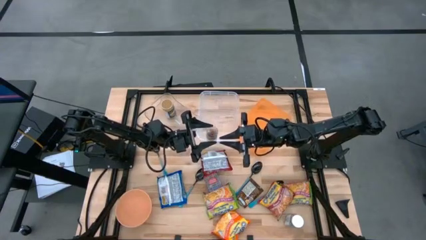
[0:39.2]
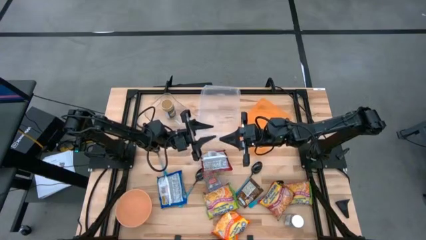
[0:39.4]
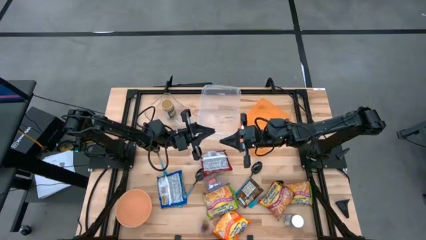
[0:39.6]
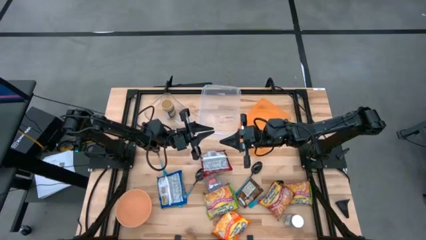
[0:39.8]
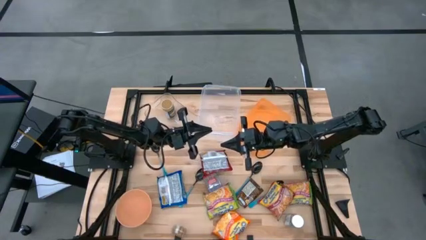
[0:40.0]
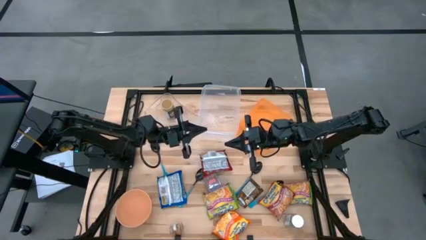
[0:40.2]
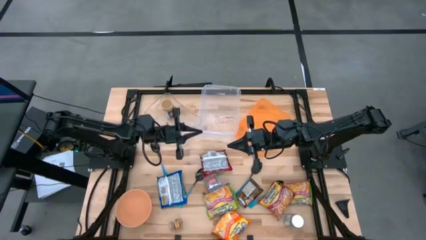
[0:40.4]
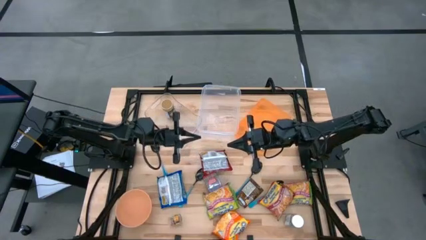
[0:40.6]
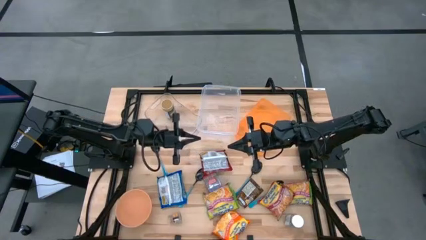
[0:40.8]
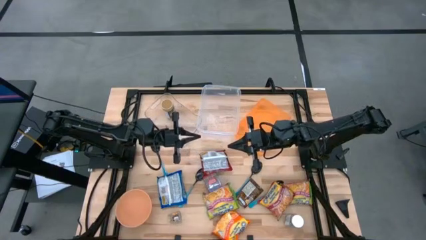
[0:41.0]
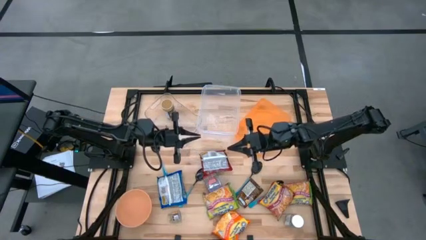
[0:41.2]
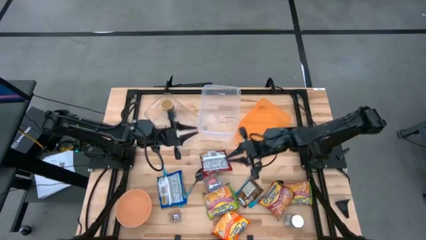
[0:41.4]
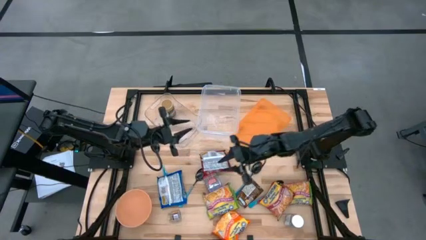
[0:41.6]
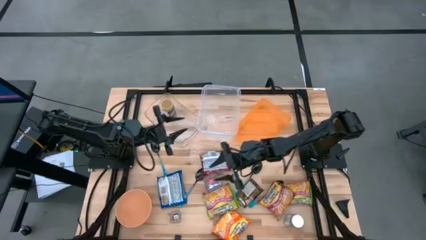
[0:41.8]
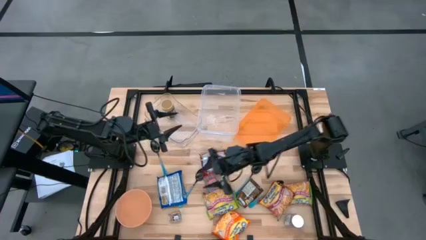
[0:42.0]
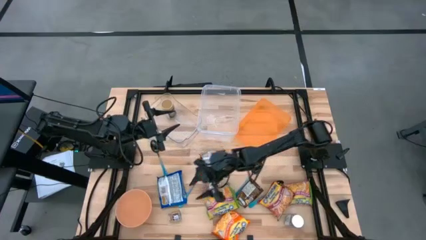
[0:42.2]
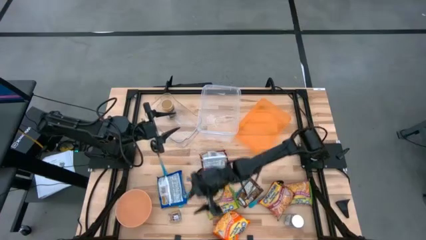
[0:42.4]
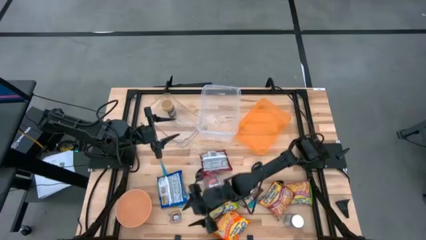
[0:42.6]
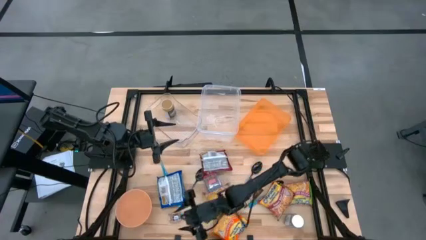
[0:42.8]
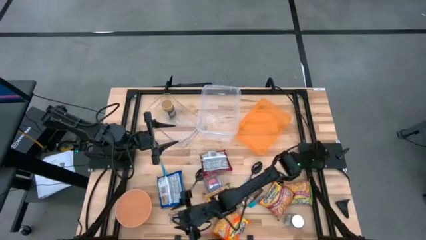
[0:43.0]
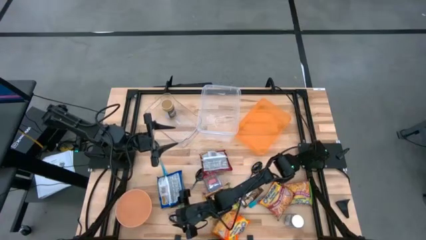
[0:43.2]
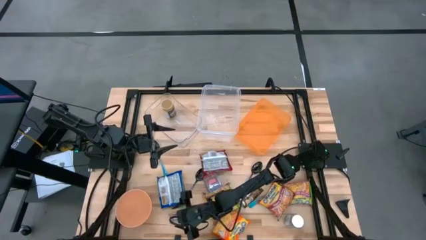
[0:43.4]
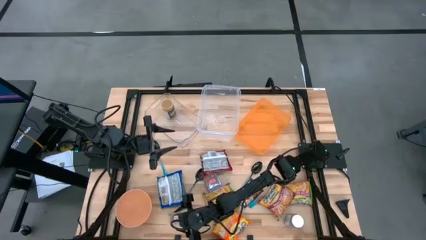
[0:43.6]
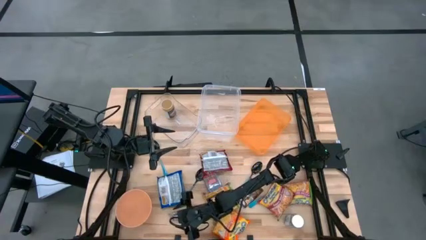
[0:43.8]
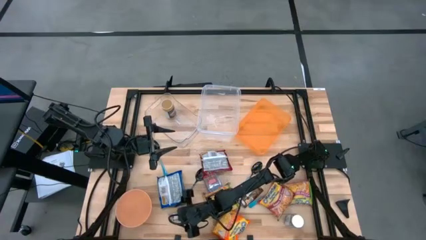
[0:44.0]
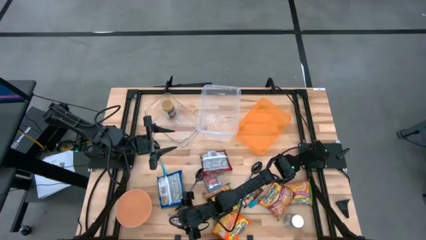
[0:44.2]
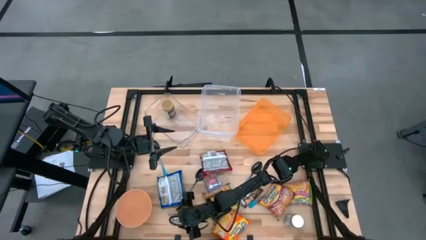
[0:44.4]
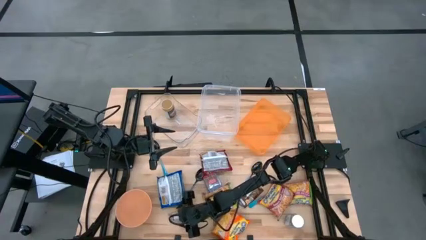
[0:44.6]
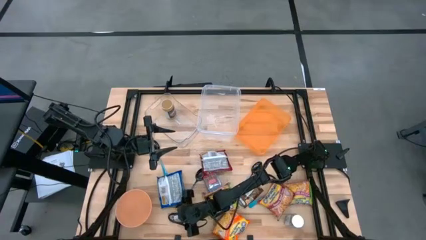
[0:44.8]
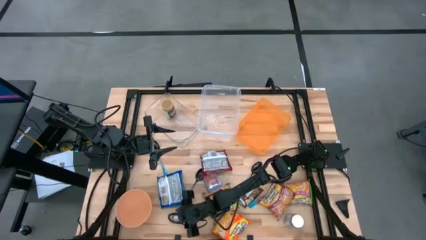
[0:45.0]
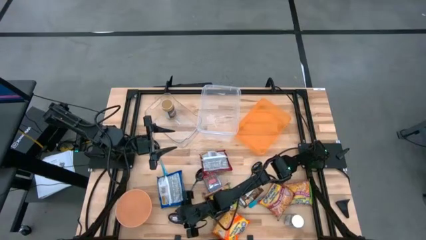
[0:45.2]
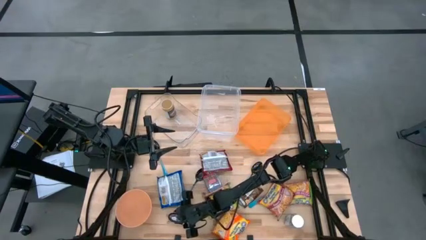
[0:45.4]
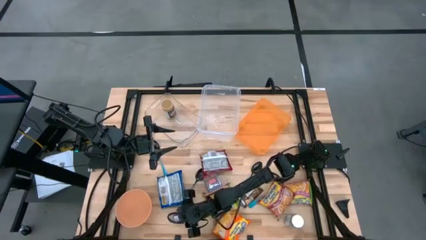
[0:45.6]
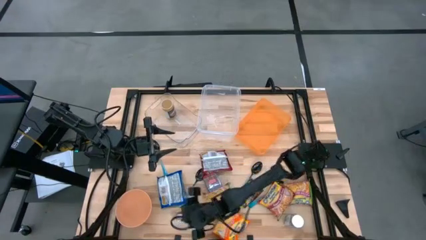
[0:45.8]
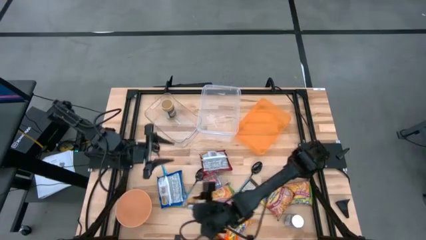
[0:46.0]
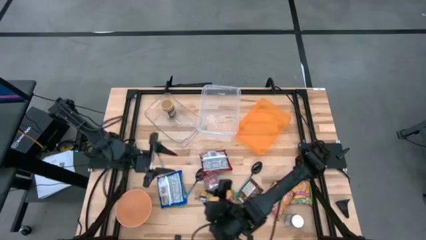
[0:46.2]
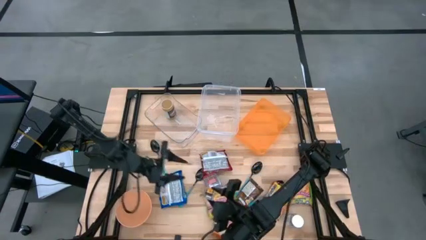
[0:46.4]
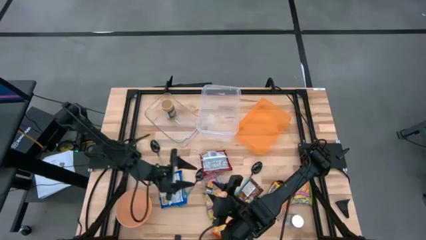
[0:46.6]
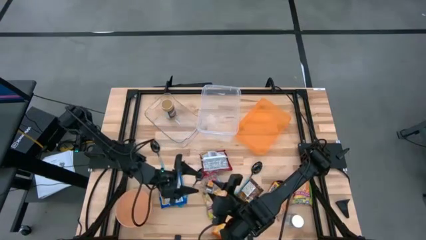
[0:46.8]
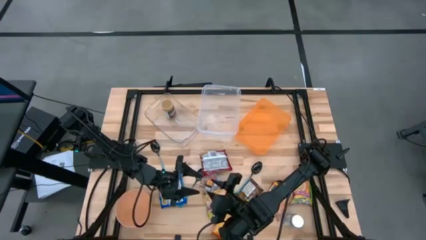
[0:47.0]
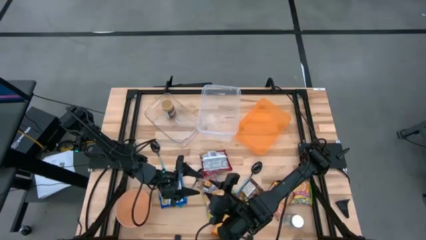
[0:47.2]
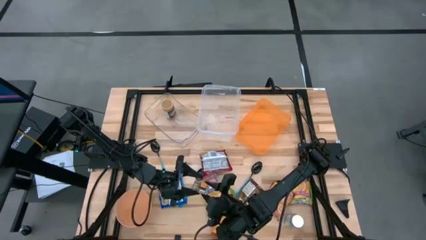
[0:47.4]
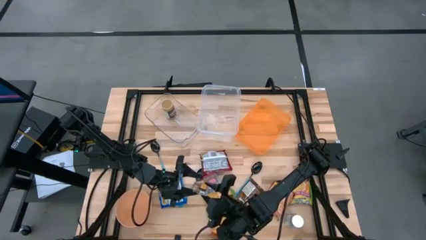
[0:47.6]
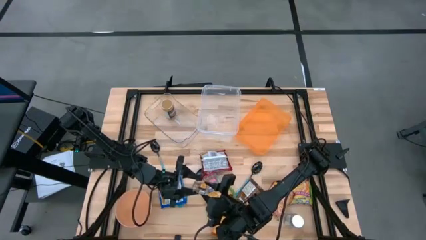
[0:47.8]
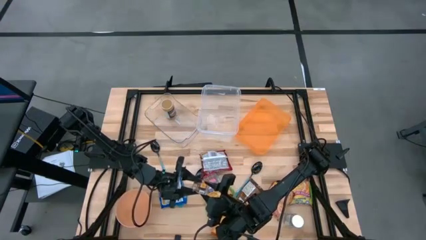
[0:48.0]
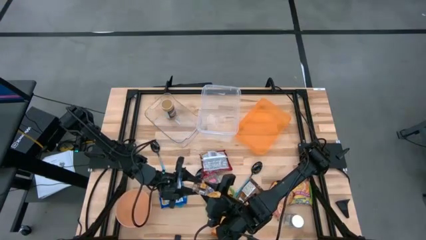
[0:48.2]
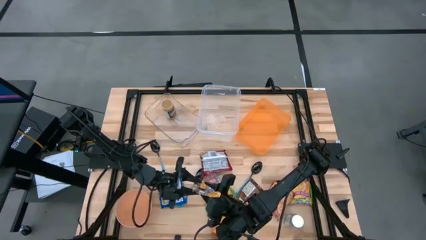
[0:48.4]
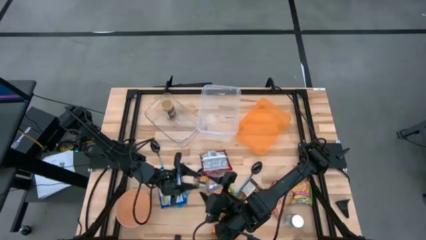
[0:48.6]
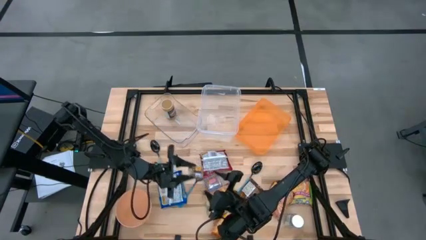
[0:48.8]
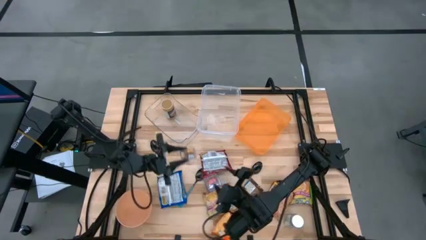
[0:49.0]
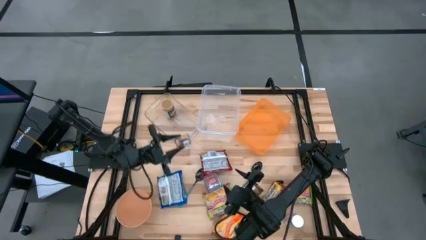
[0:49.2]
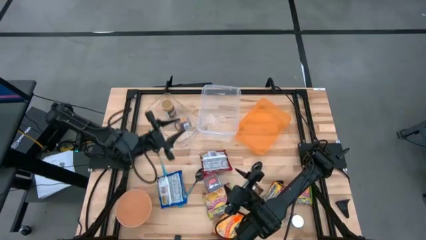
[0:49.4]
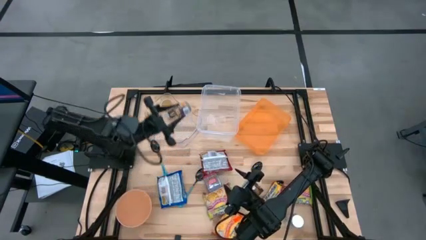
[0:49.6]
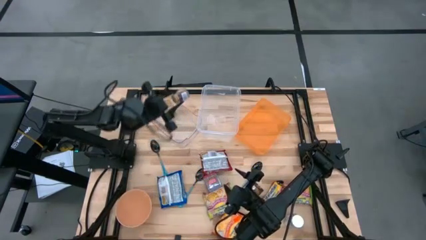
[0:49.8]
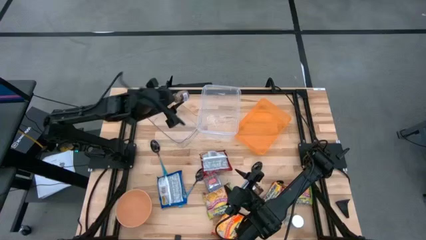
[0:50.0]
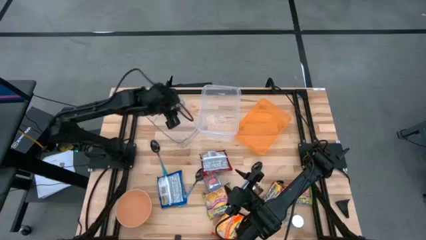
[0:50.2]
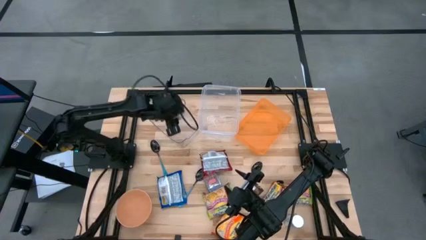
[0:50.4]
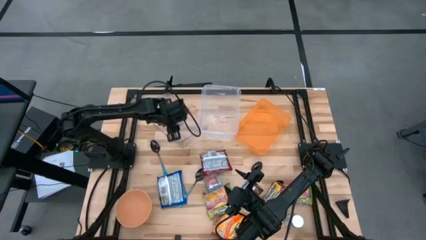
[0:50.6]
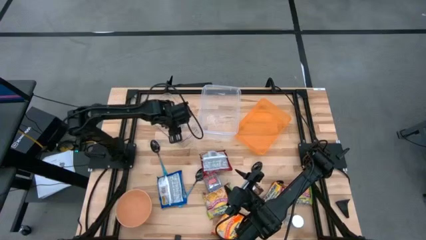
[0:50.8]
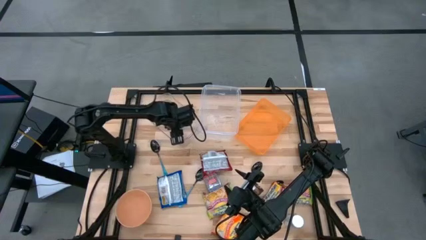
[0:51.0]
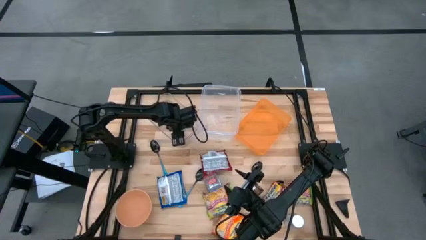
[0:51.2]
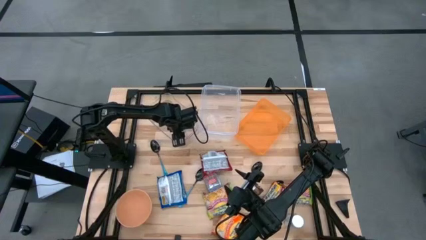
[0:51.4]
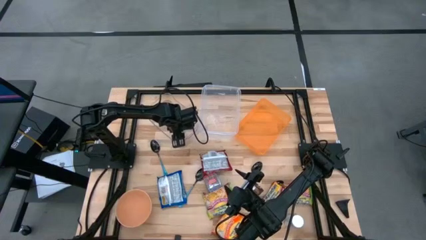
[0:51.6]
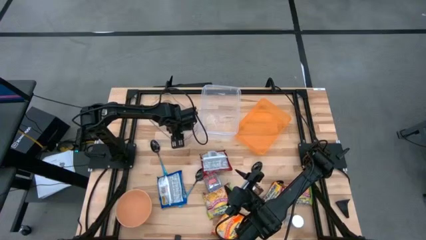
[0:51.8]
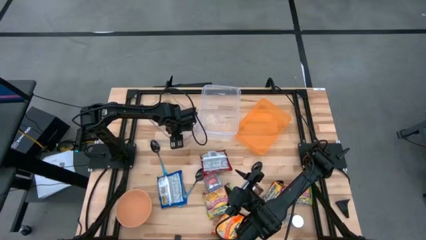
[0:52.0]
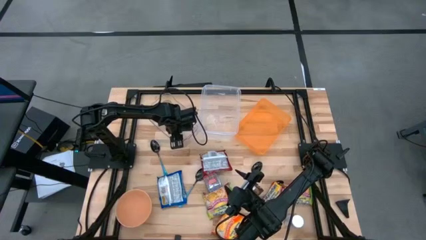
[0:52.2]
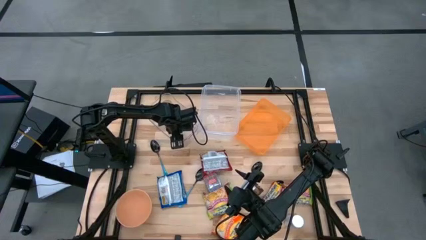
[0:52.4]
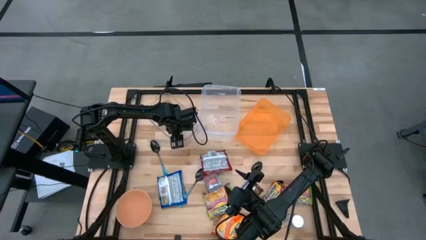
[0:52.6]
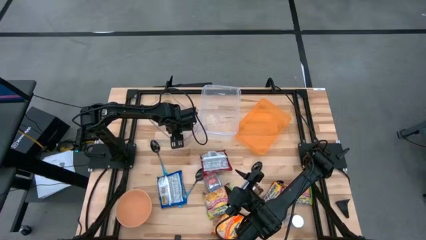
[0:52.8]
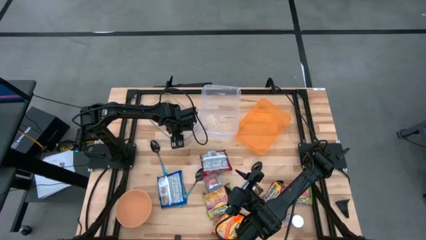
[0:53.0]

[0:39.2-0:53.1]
Task: Pick & Place Food Item
Put the brown seasoning bottle into the transparent bin
